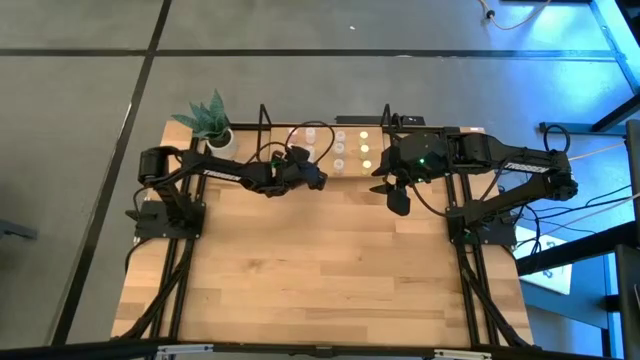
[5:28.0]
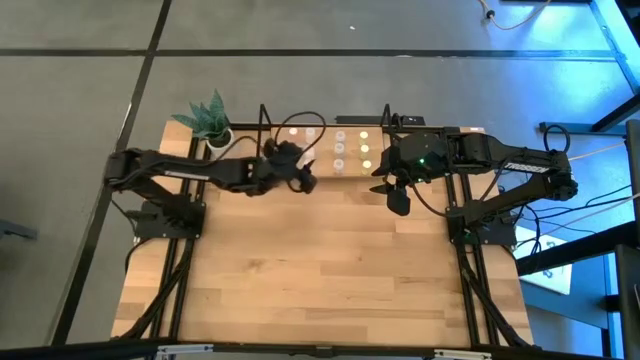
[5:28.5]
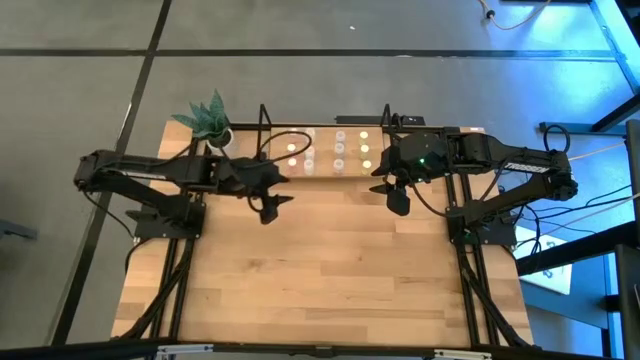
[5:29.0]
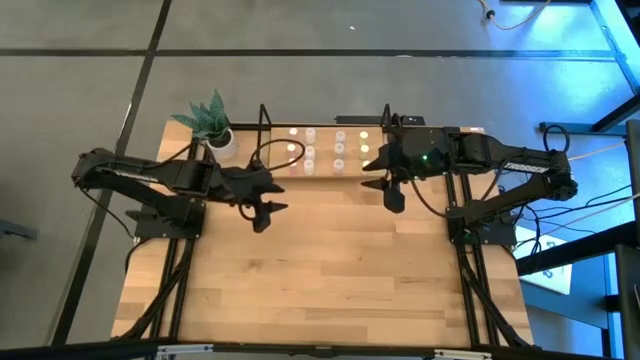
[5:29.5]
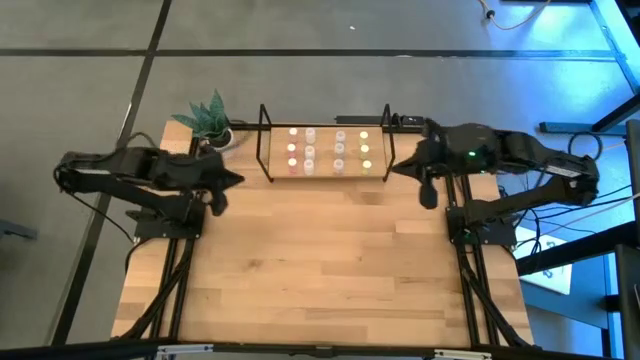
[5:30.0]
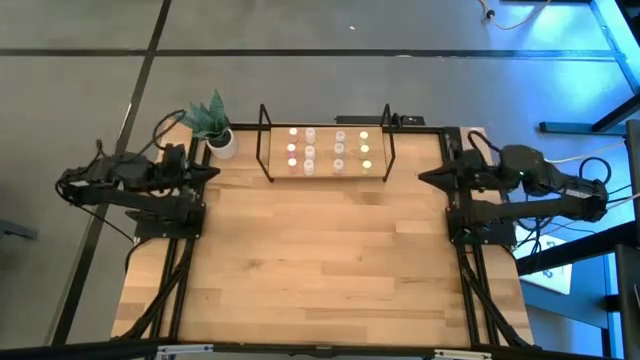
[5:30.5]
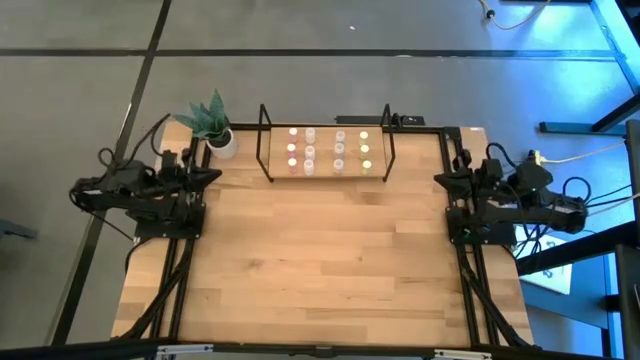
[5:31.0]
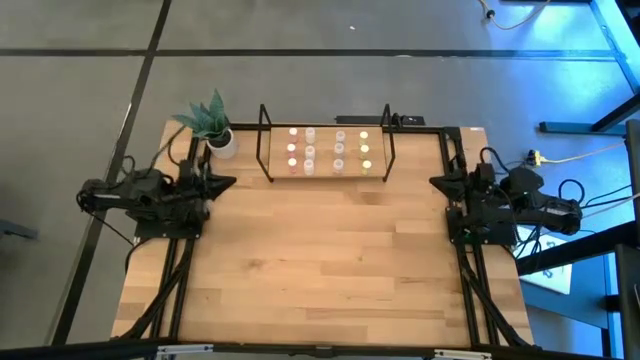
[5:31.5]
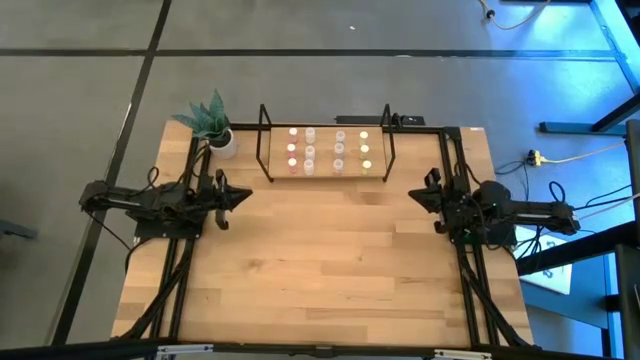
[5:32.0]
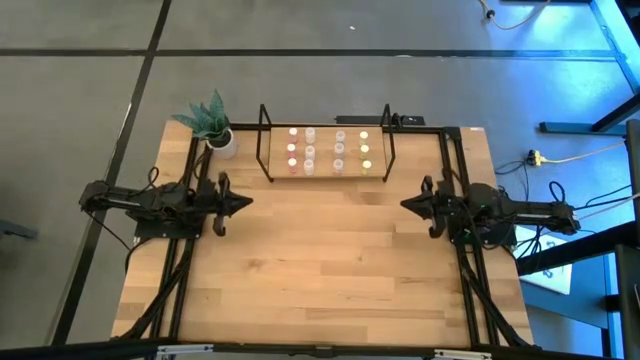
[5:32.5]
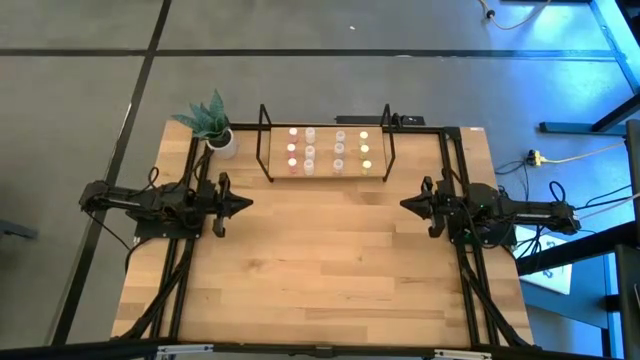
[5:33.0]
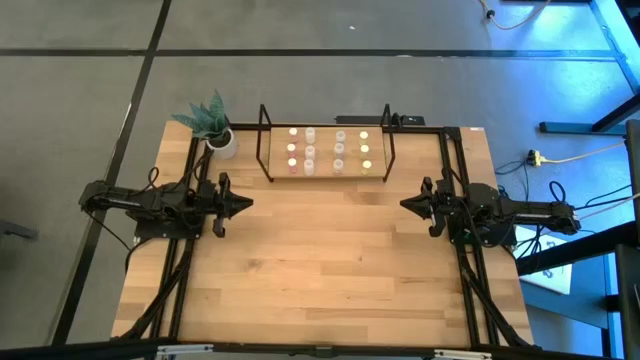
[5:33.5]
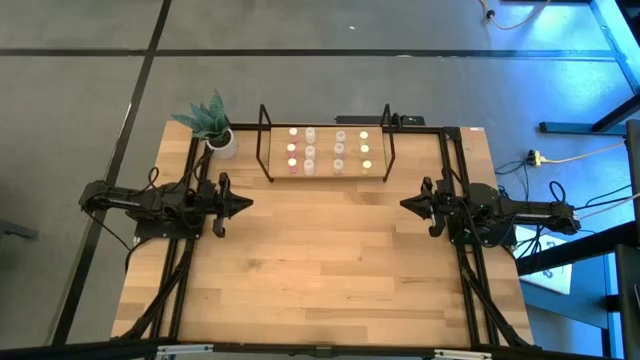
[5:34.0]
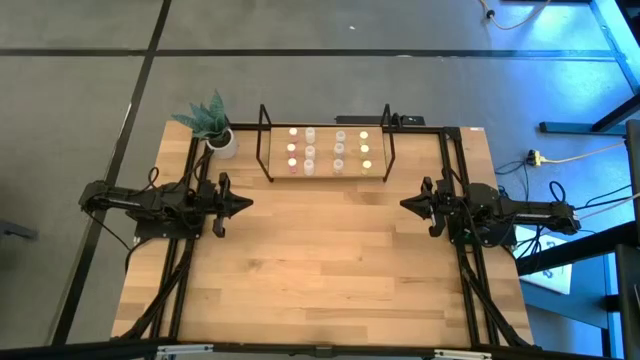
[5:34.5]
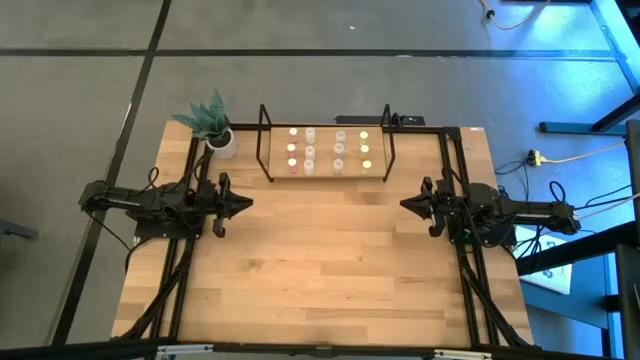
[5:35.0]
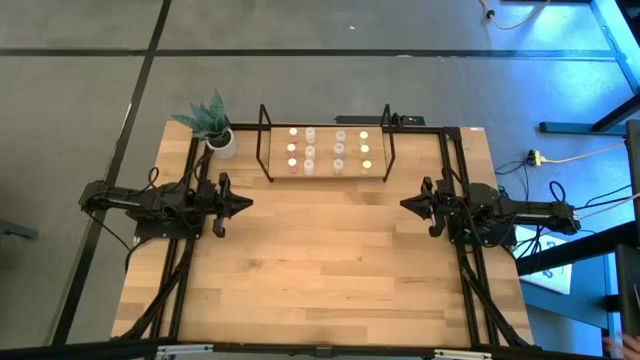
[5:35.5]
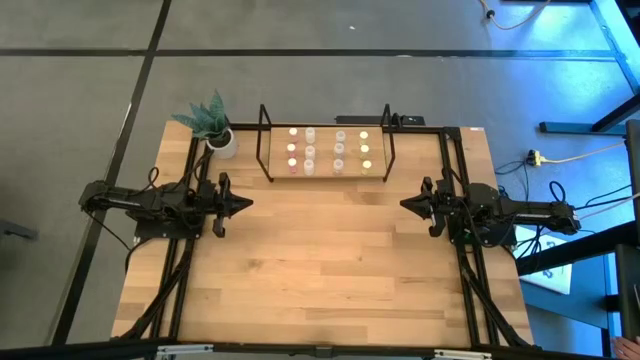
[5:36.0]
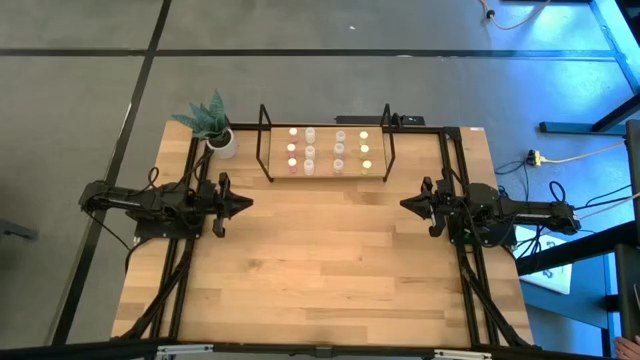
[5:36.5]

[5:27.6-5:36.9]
Task: Pick and place medicine bottles onto shelf by color
Return to Home Position

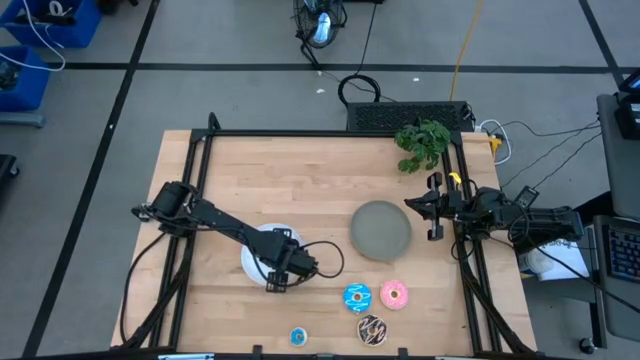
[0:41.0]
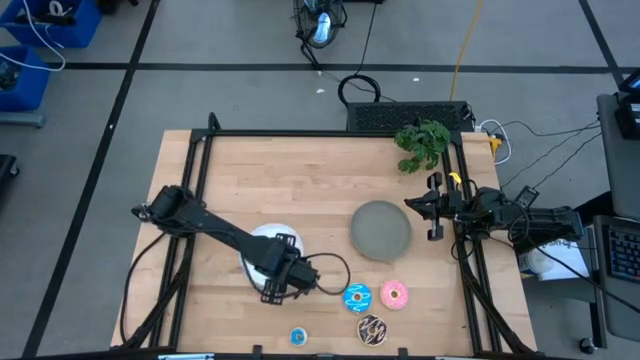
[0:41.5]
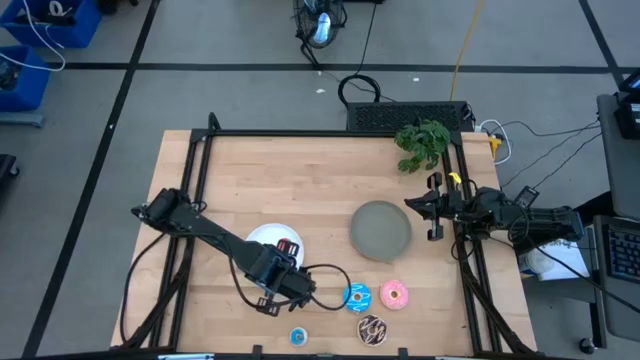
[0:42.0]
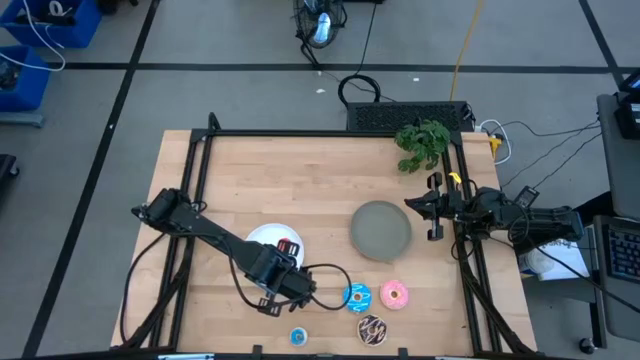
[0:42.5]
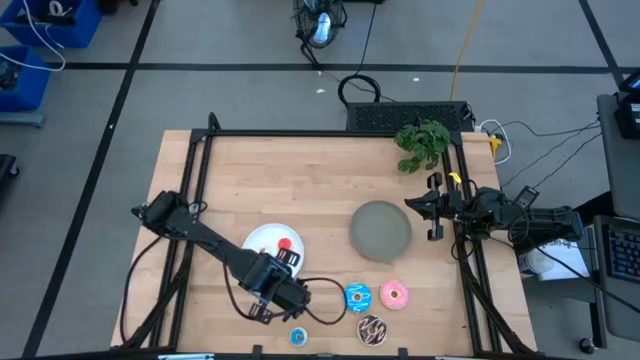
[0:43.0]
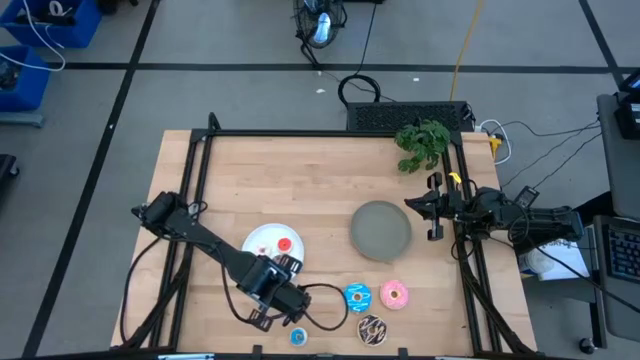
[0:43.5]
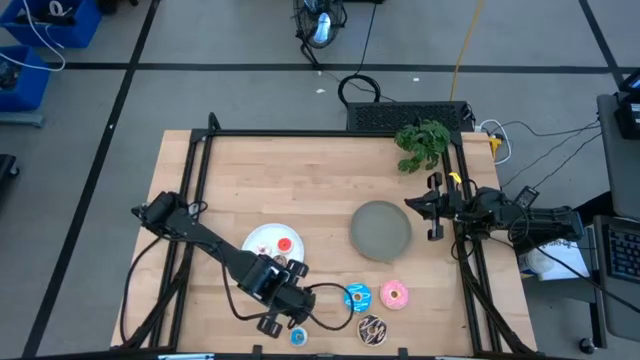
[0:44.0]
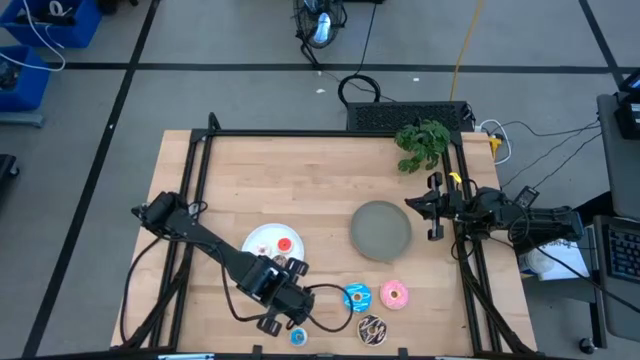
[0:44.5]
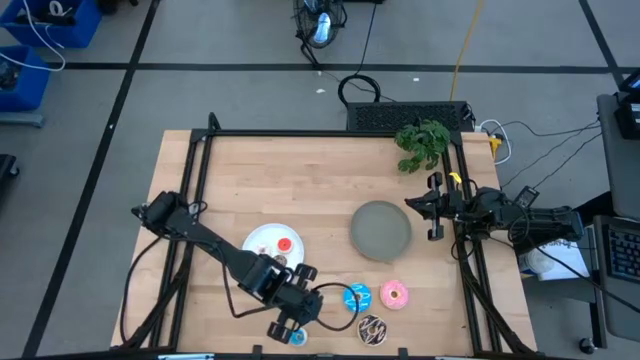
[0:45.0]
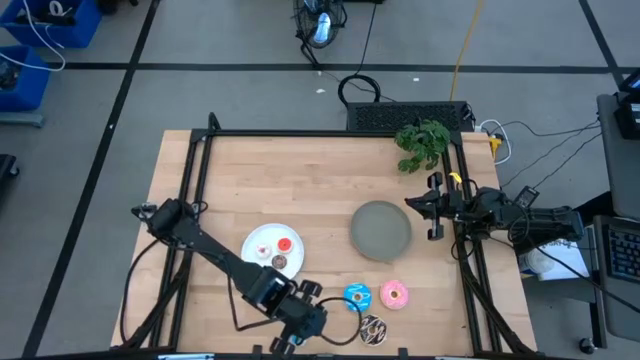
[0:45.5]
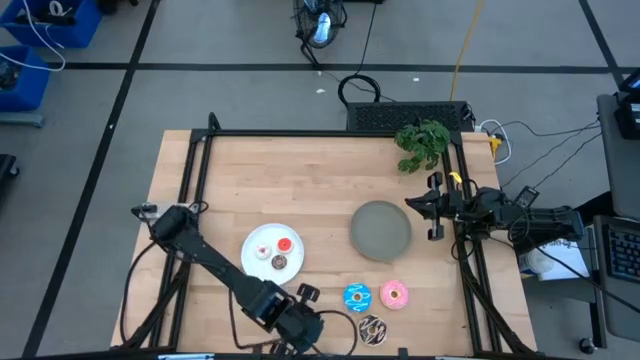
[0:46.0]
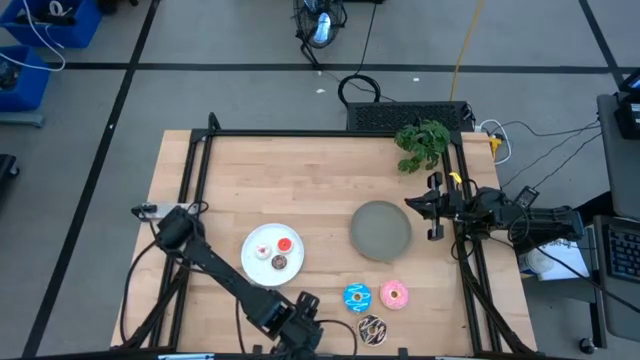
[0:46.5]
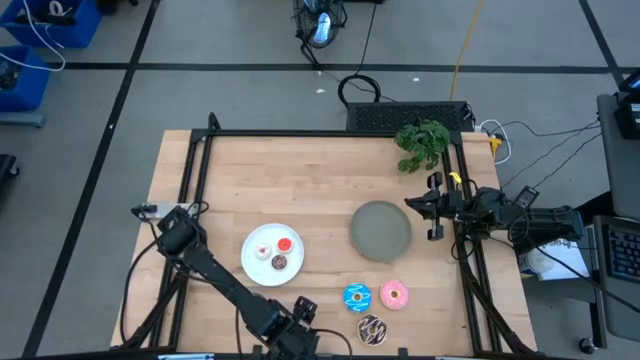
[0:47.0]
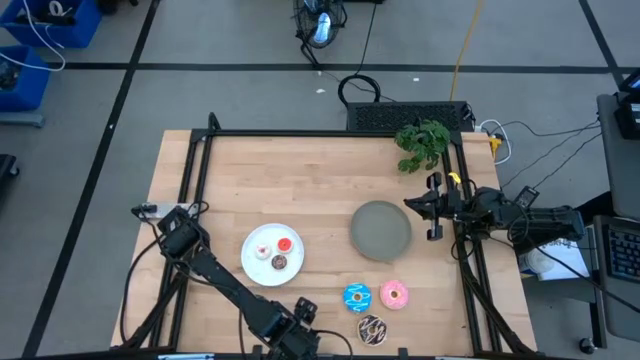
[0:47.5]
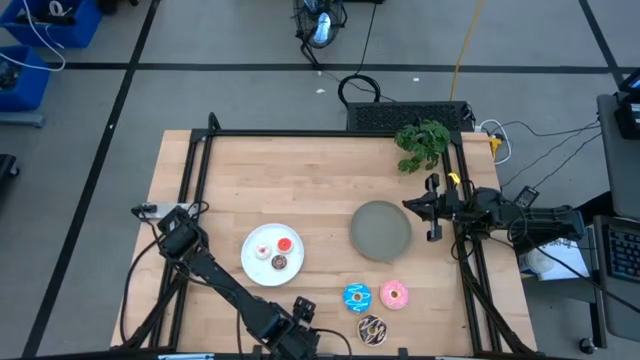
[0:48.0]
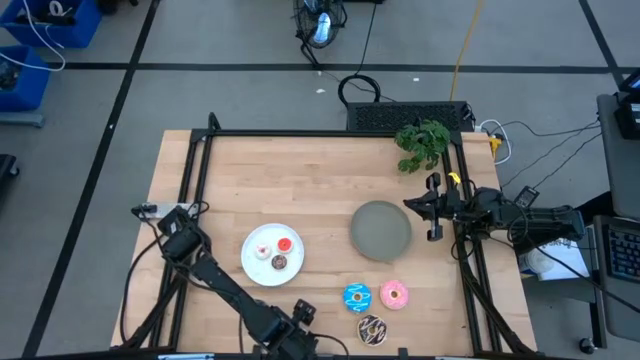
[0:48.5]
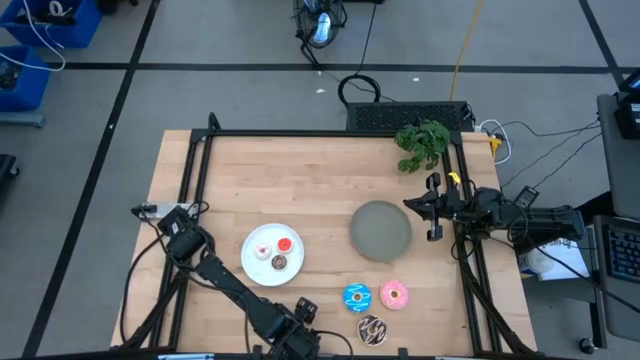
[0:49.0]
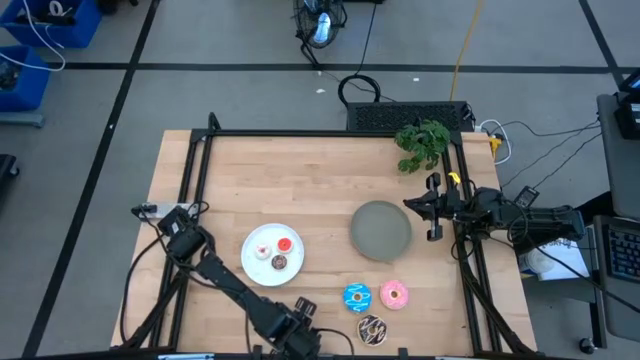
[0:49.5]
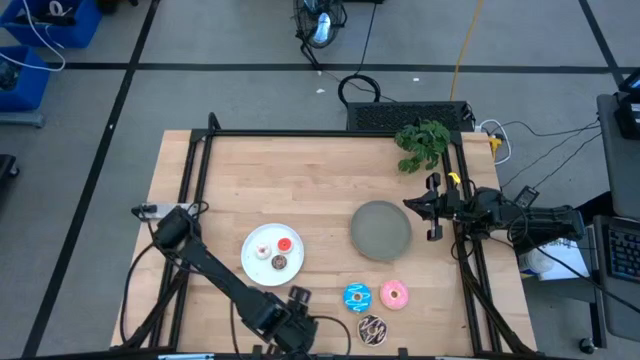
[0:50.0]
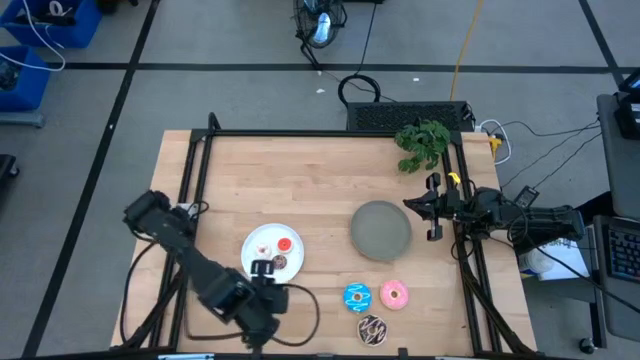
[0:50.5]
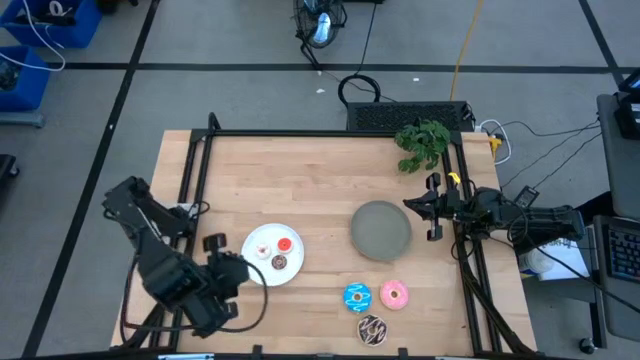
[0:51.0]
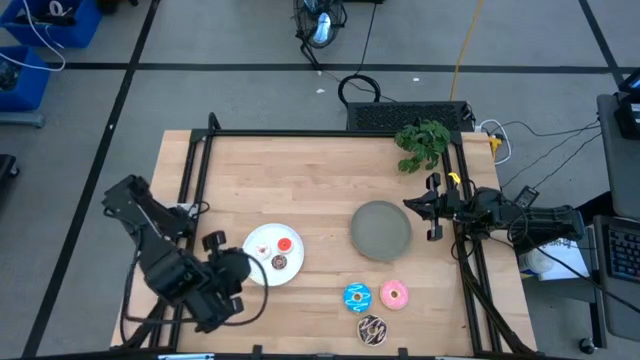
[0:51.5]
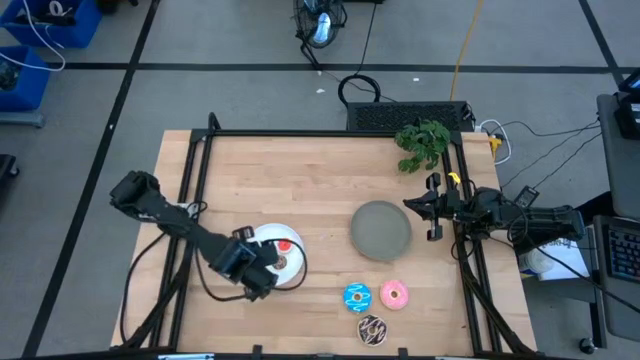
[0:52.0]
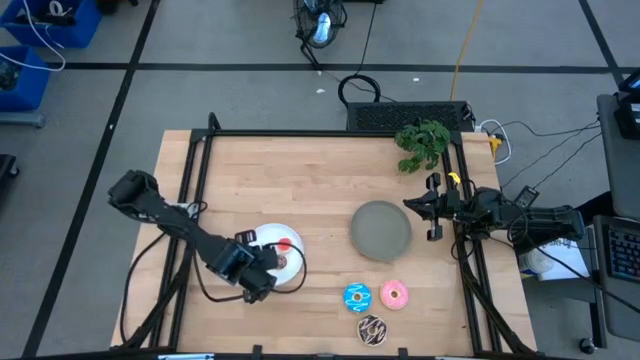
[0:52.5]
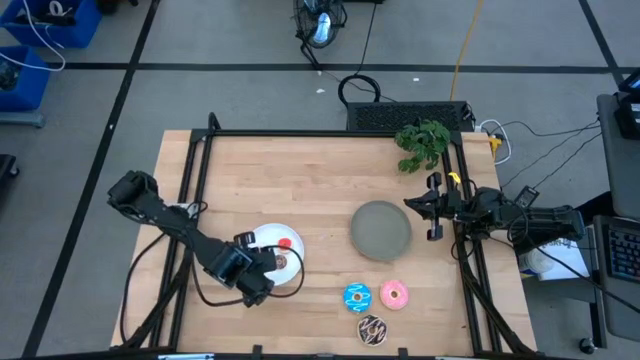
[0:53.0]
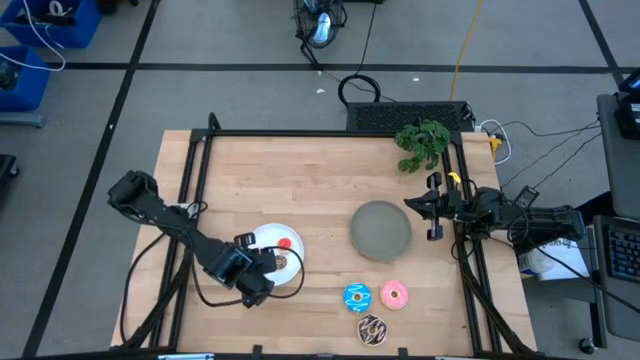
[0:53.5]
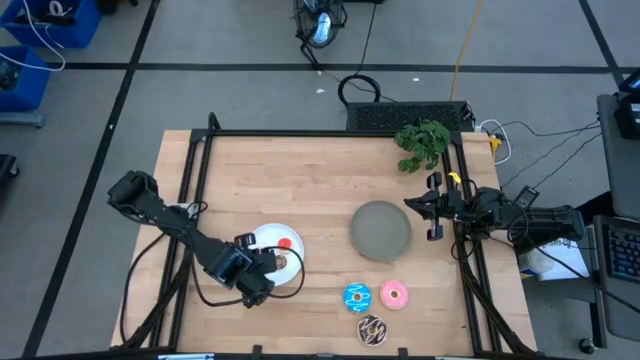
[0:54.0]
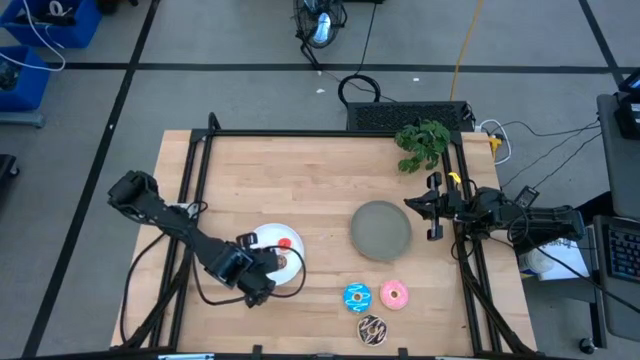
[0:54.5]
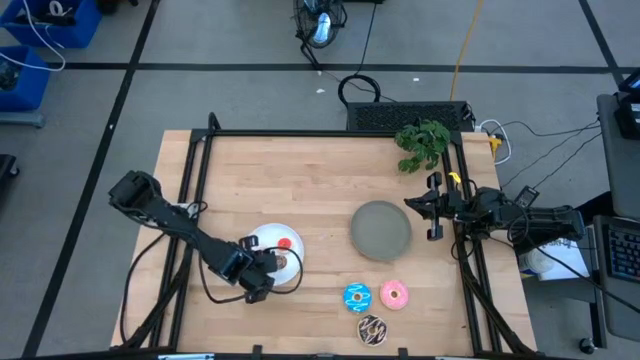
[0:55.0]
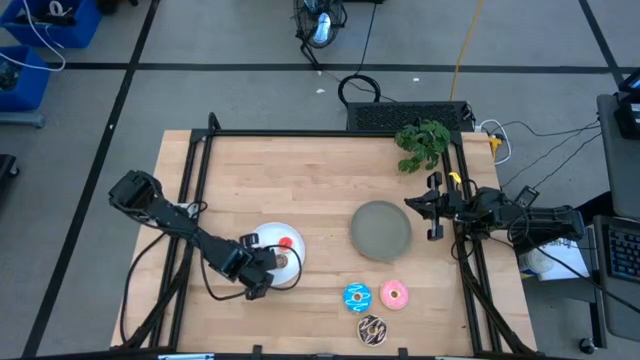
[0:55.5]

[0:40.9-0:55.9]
Task: Pick & Place donuts
Put the small blue donut on the white plate
